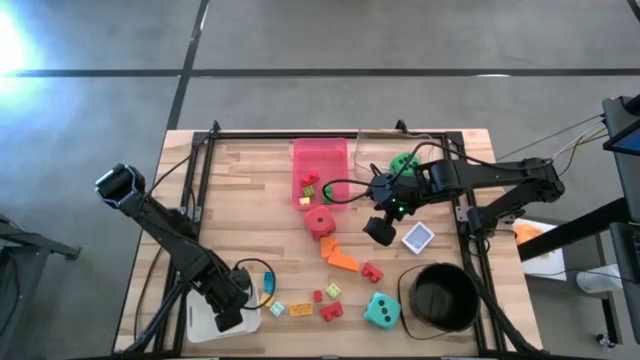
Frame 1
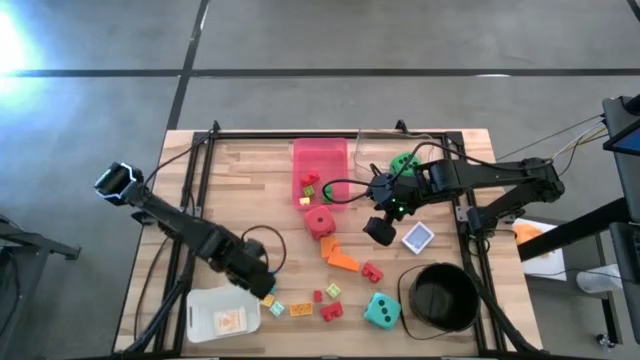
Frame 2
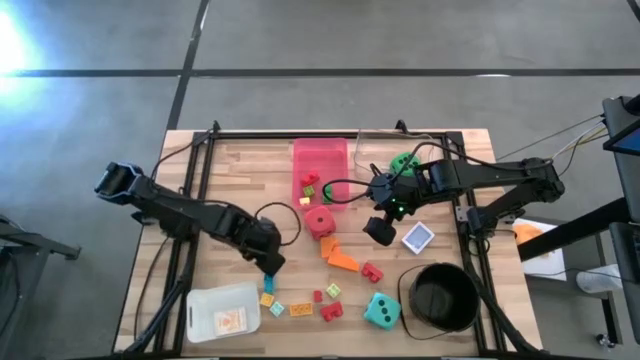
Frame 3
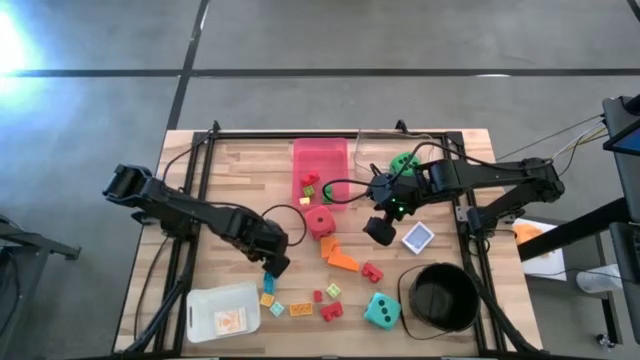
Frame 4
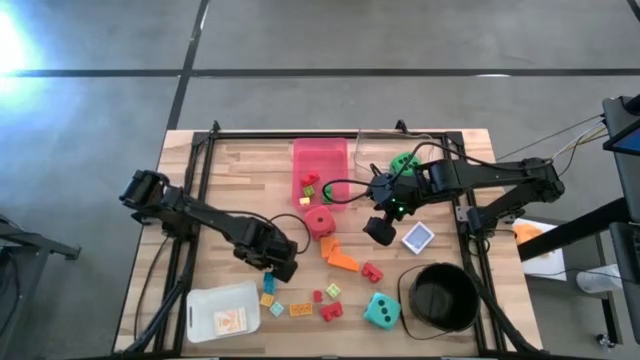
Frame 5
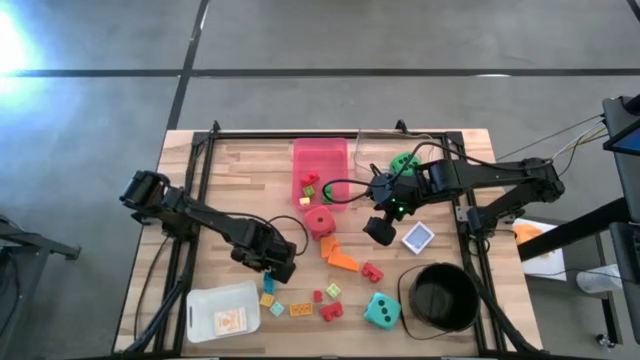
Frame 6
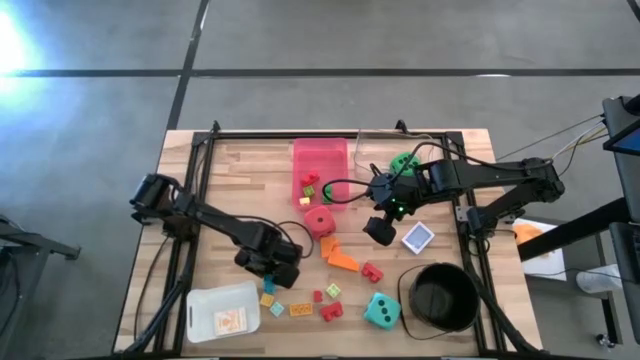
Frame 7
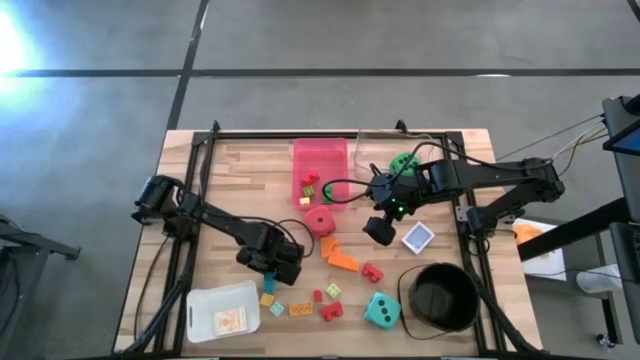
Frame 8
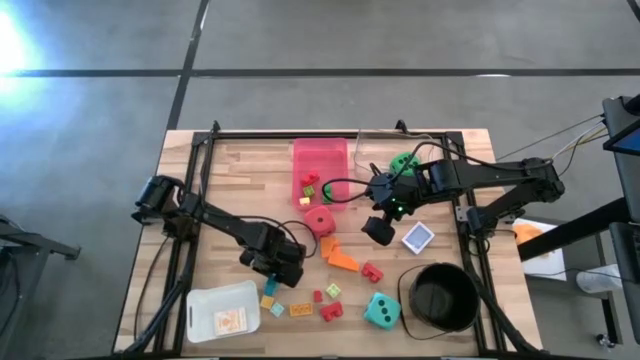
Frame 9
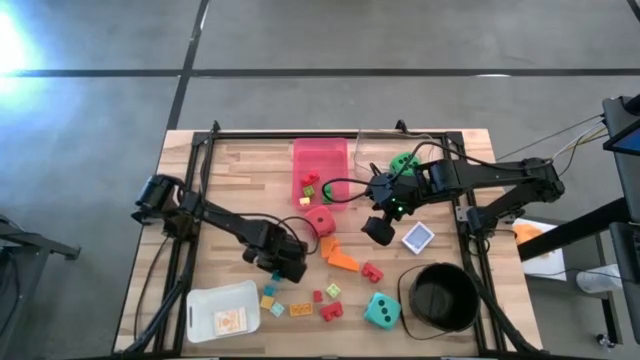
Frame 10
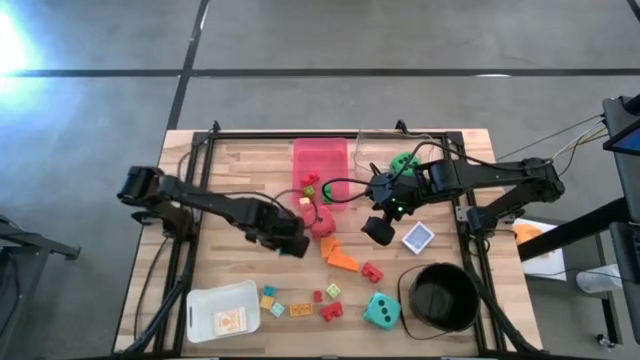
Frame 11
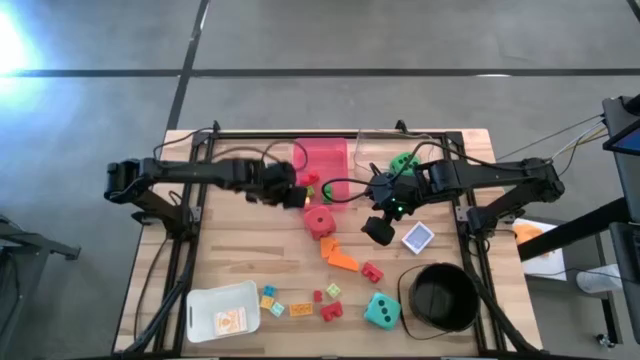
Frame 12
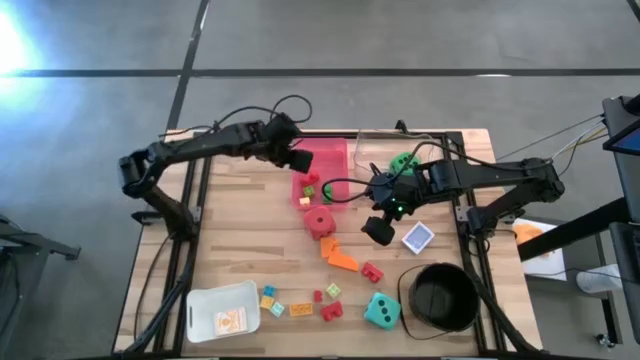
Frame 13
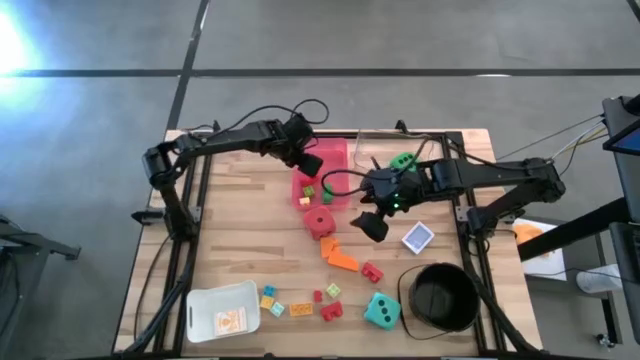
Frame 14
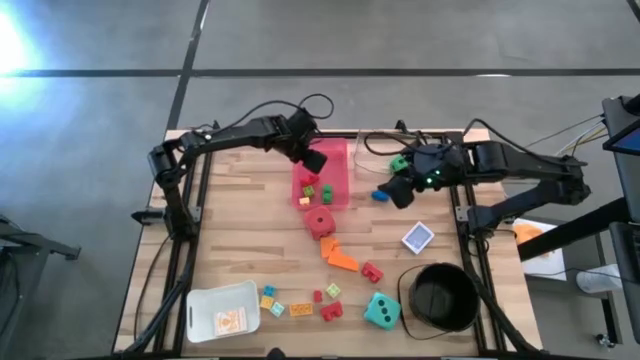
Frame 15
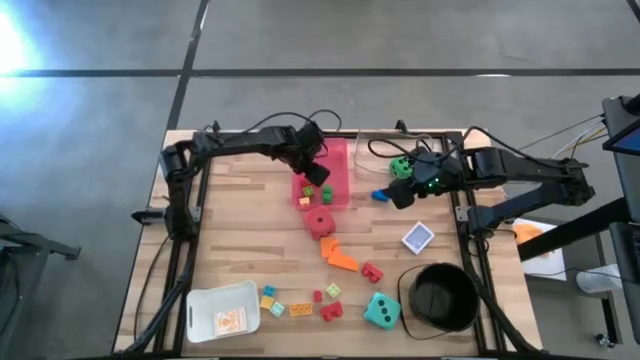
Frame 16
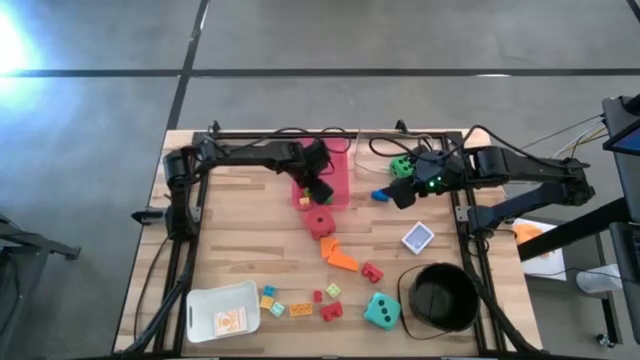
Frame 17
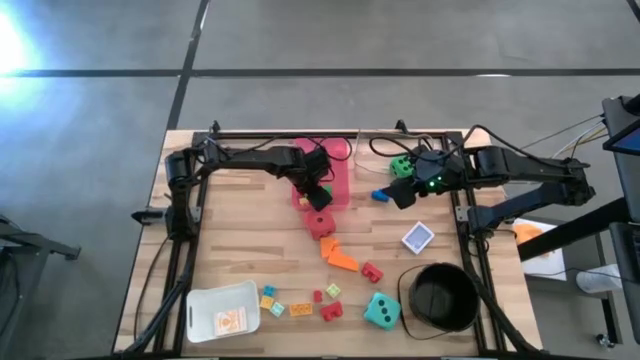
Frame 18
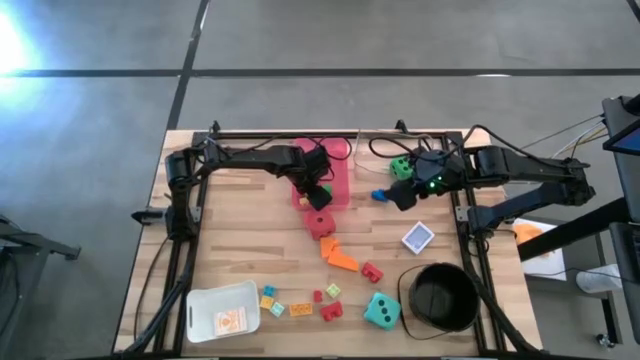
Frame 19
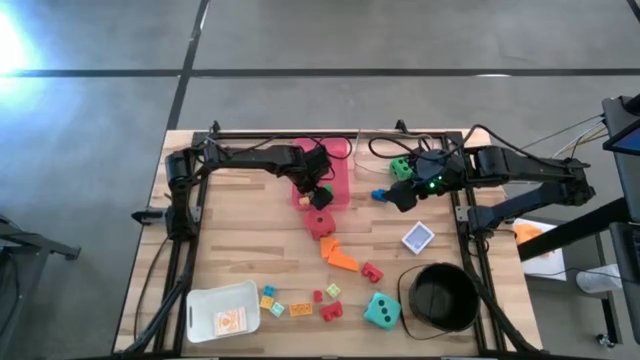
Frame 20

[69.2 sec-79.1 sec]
Task: Pick & Place Toys
Put the blue game piece into the red bin

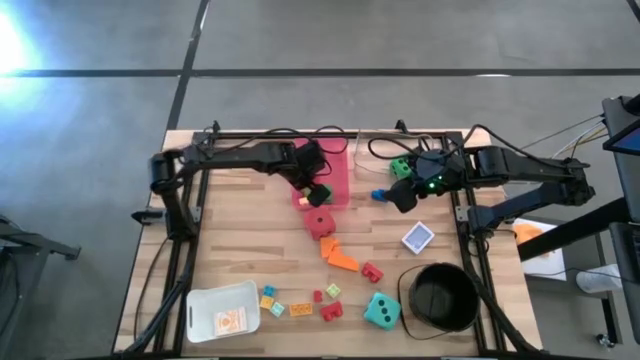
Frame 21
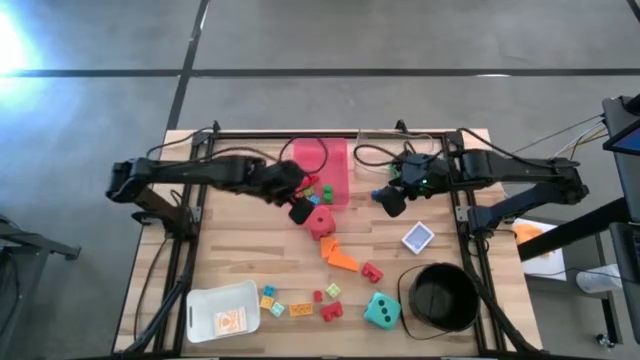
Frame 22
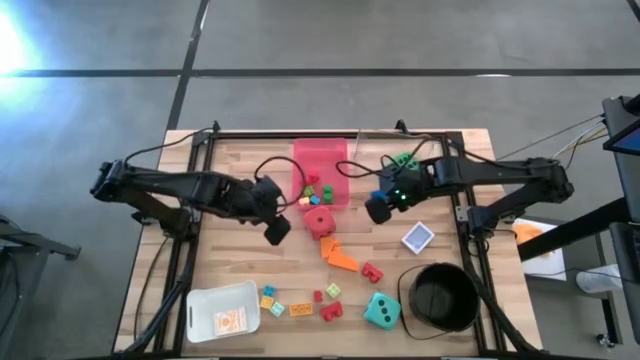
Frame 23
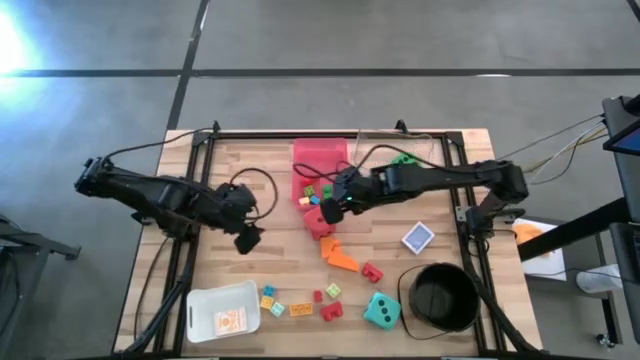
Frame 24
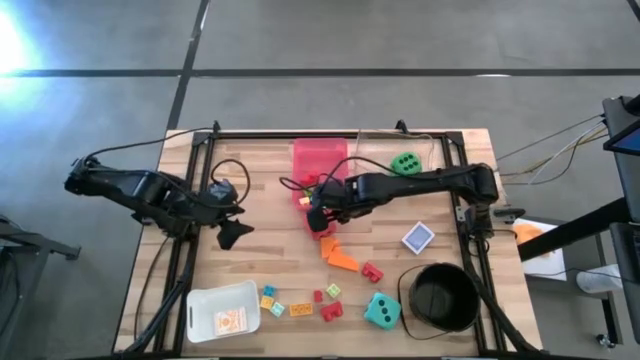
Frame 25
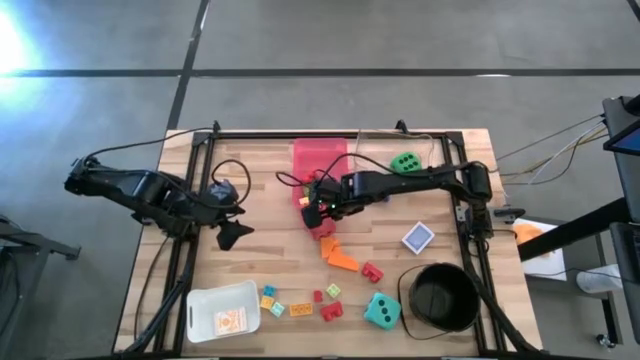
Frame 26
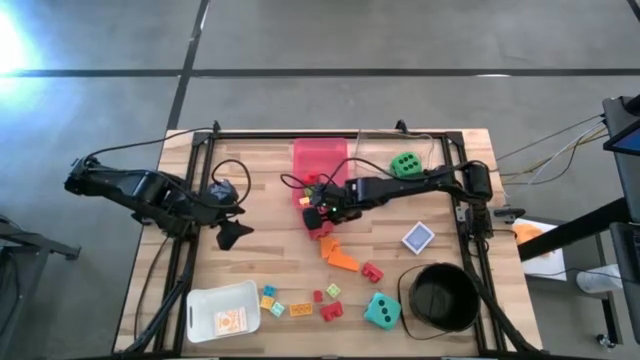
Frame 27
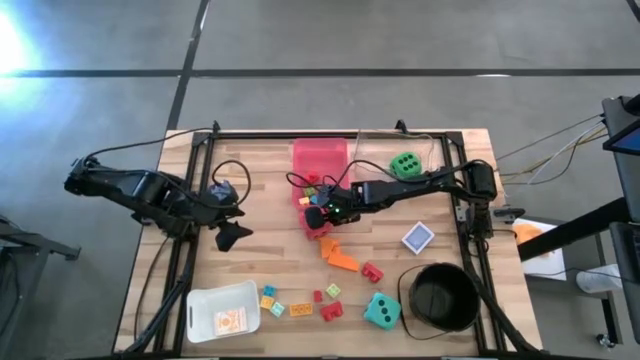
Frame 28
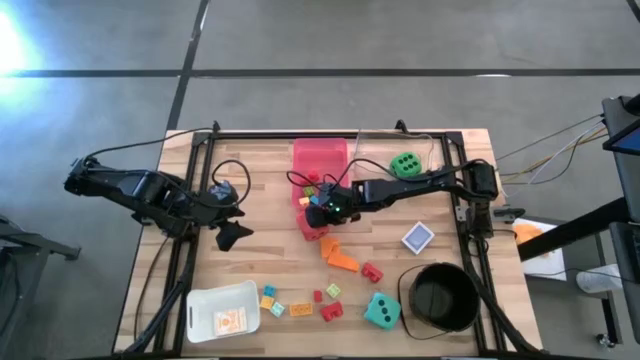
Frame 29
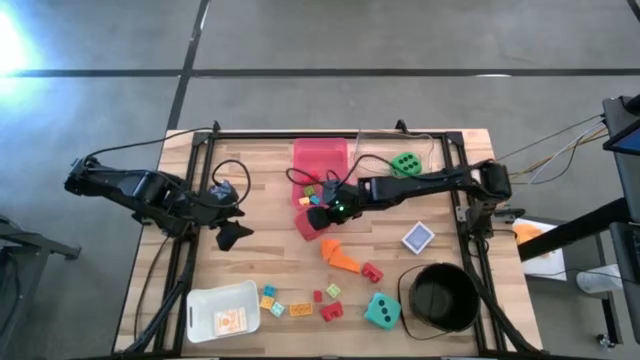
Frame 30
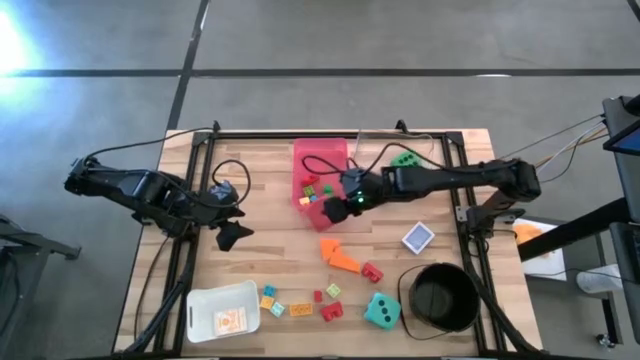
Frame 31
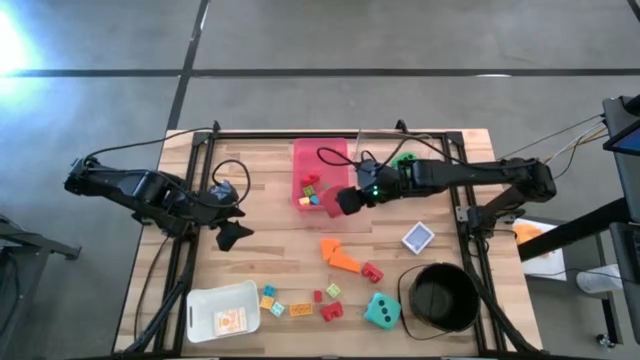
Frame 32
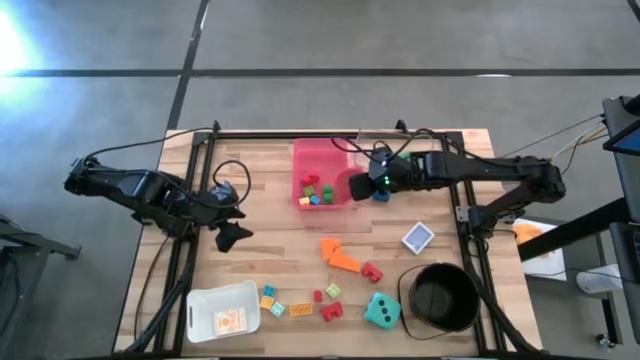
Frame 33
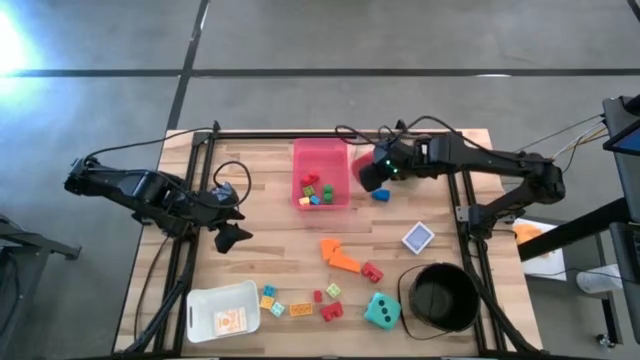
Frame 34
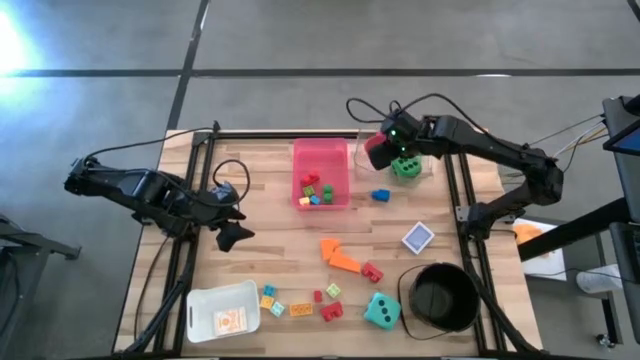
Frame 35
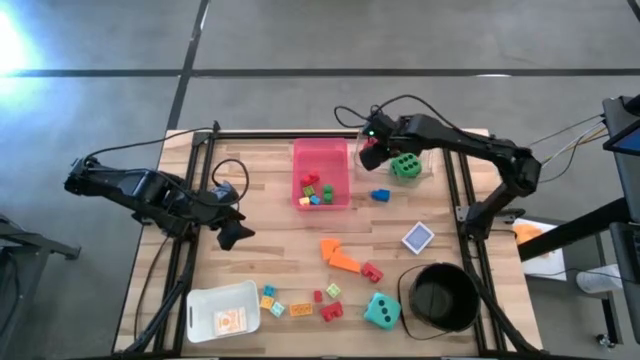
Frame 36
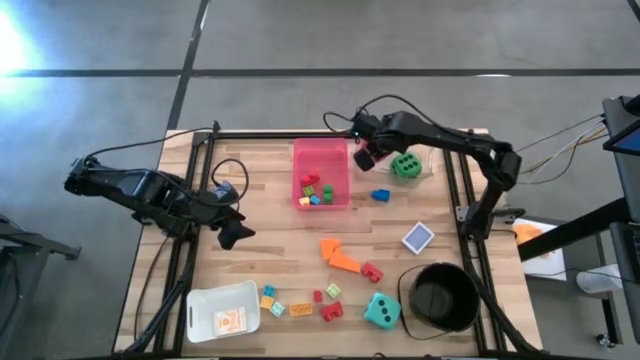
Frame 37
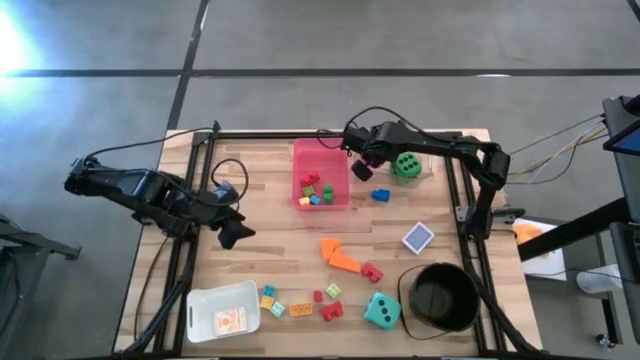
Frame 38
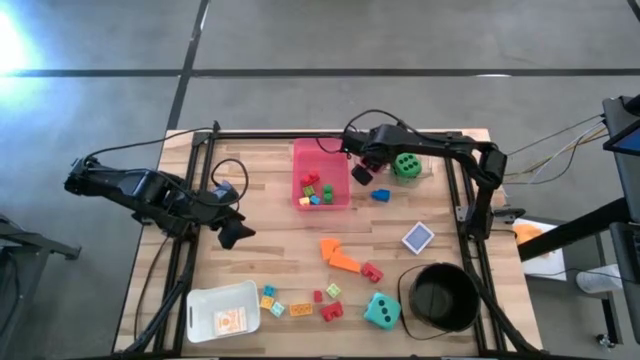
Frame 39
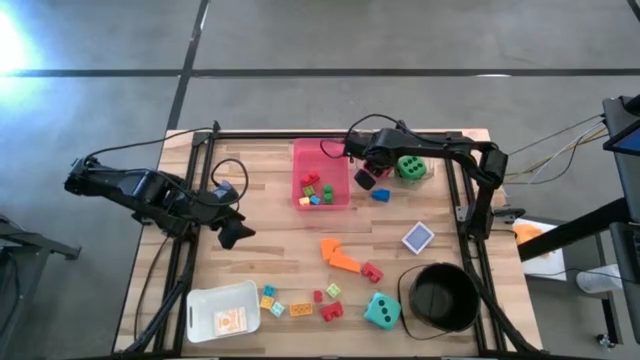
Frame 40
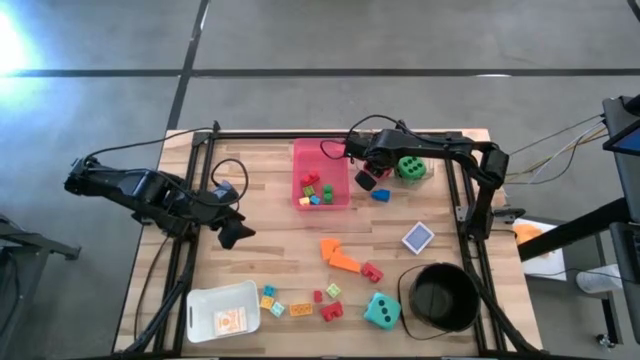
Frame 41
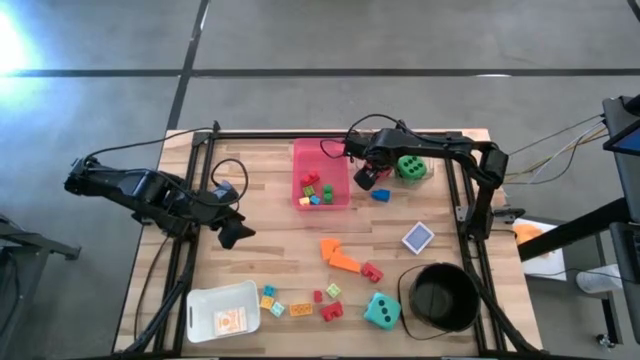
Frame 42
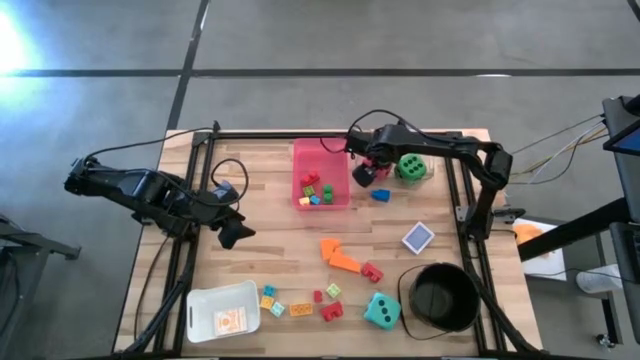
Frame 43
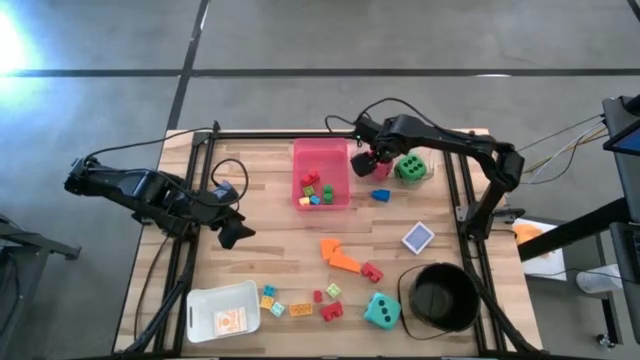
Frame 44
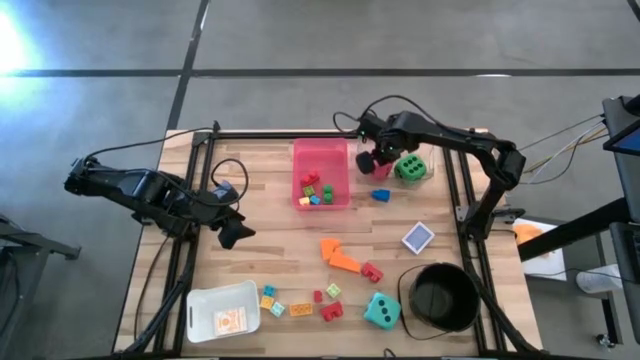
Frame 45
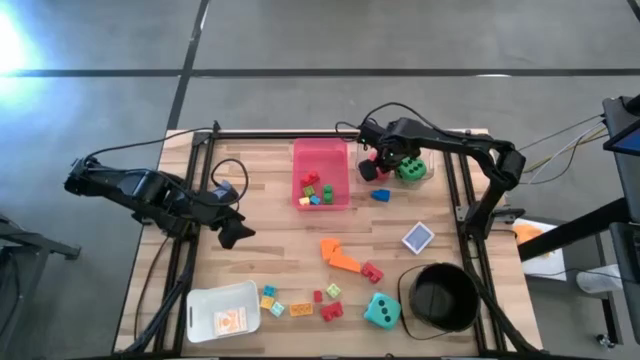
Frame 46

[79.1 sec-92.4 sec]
Put the red dice into the transparent bin
